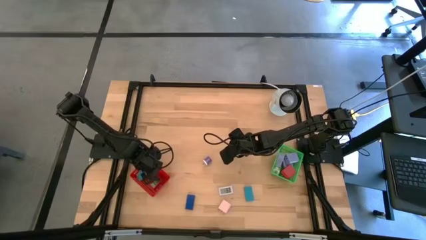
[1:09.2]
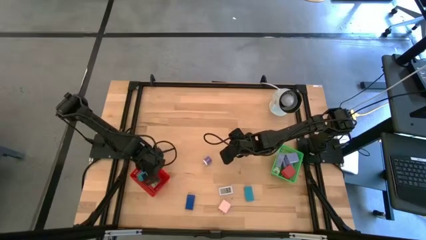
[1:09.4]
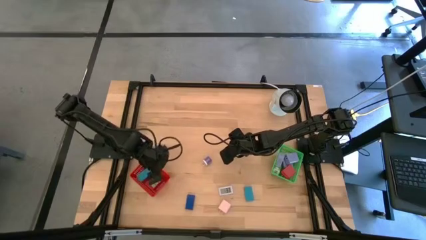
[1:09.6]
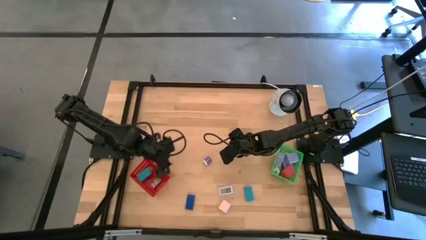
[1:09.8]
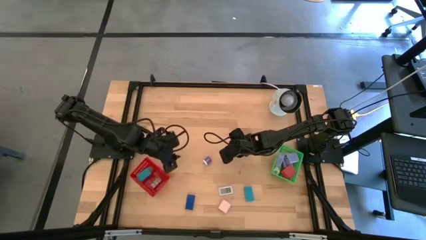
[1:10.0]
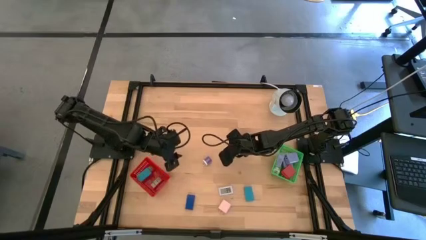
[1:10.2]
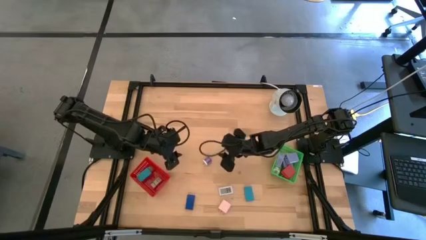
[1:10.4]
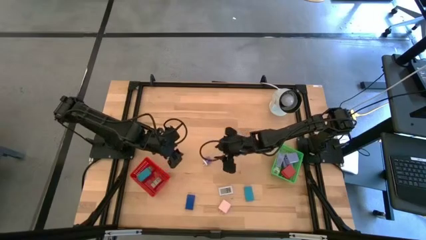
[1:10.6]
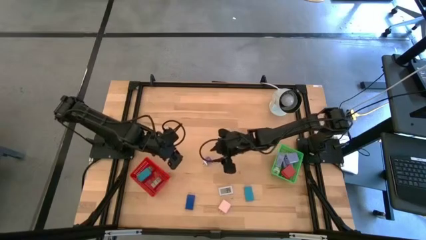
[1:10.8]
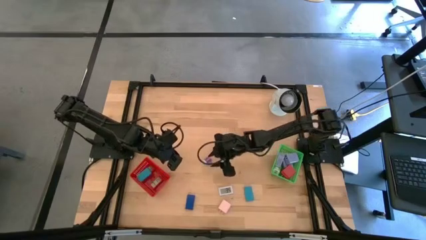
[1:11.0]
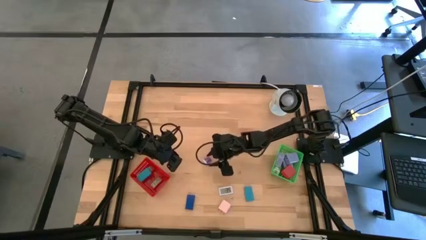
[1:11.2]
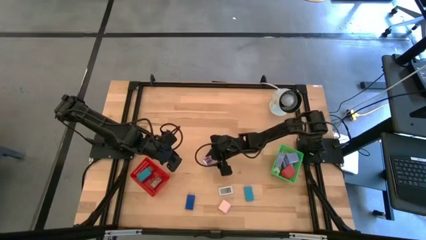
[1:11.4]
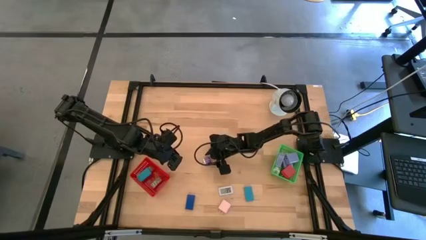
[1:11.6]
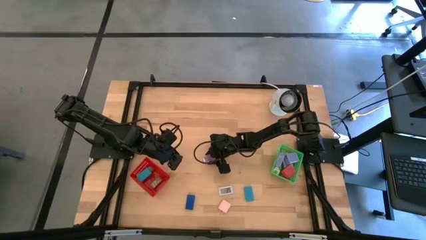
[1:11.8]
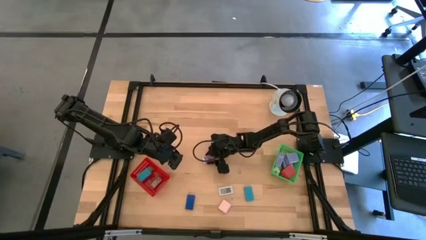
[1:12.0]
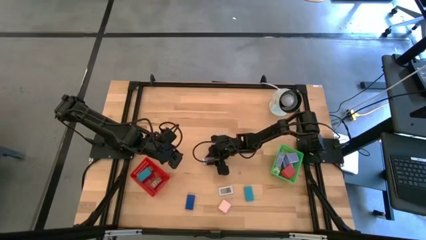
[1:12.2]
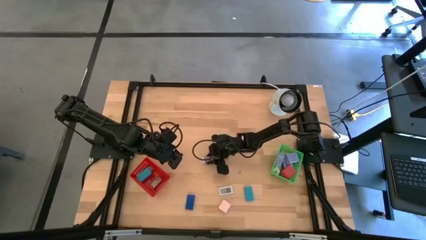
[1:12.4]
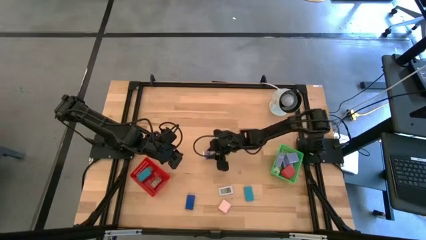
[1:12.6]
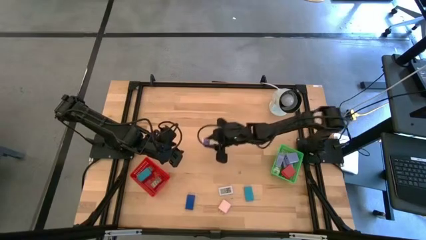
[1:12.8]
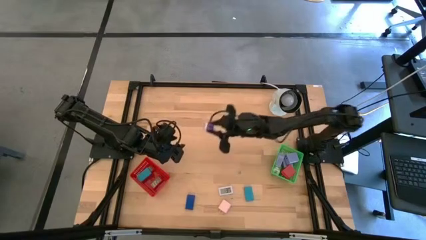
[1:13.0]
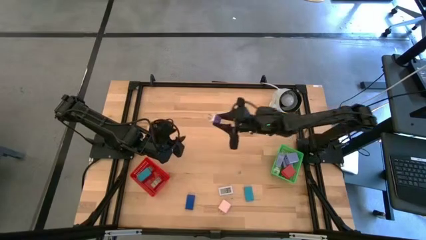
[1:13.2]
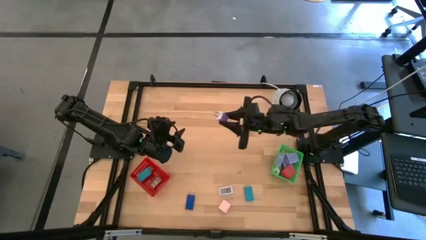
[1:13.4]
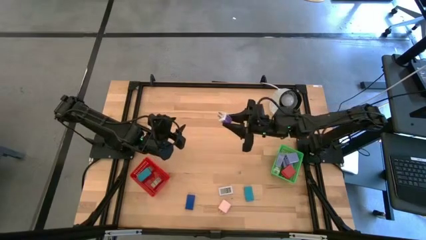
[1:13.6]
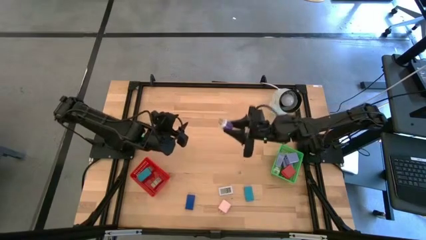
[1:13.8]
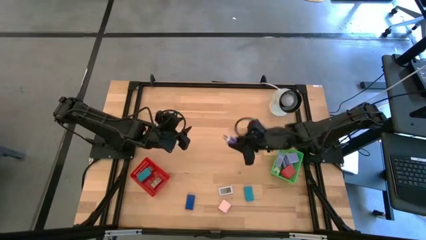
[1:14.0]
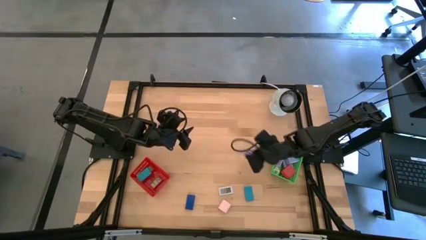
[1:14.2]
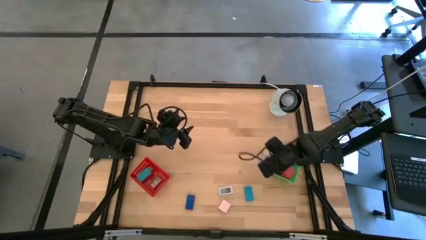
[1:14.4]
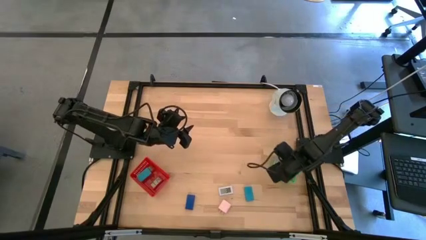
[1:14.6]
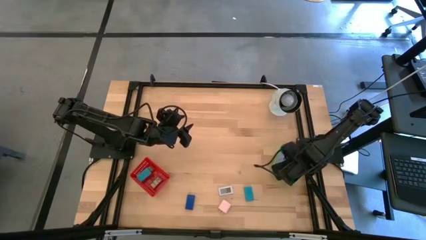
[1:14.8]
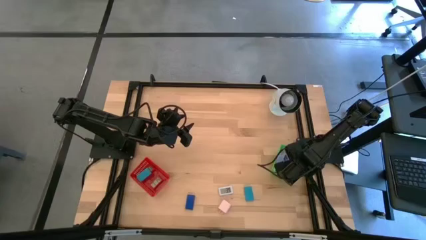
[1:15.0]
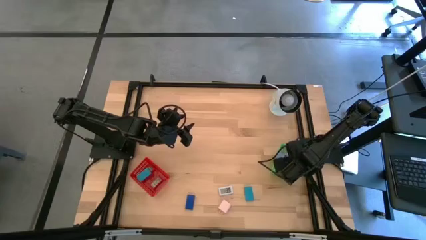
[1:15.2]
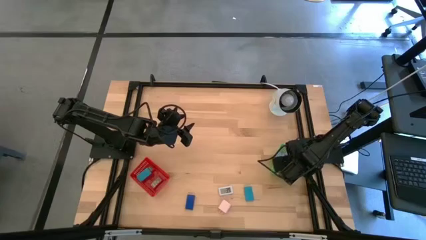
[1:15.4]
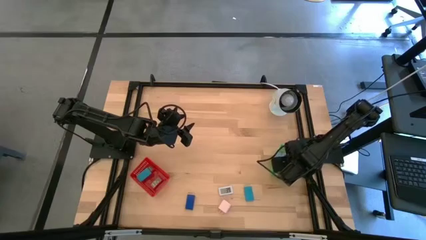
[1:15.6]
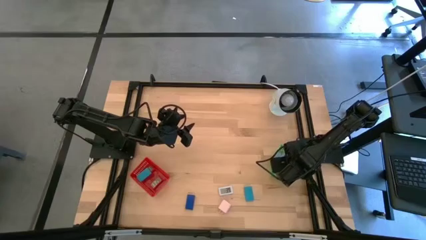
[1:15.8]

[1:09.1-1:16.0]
Task: Pick & Place Office items
Put the violet power adapter into the green bin

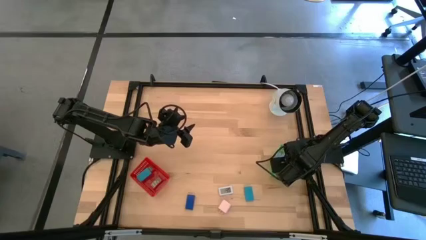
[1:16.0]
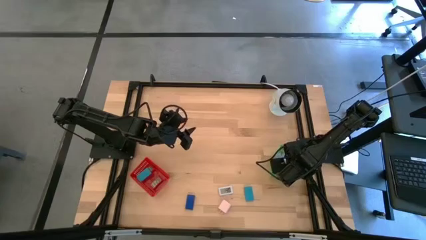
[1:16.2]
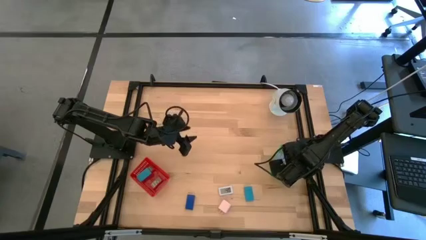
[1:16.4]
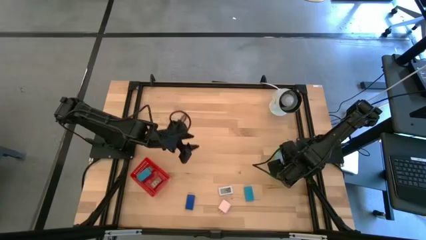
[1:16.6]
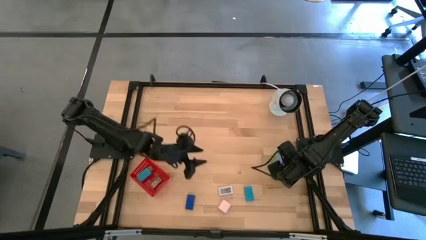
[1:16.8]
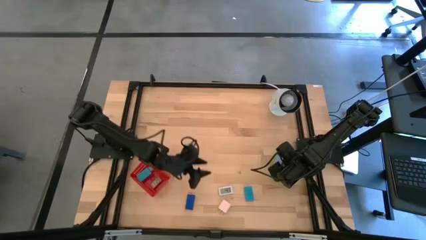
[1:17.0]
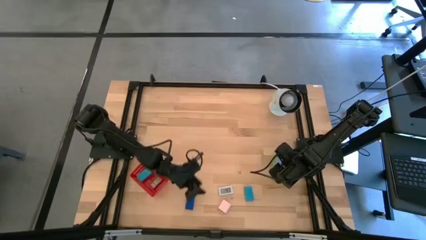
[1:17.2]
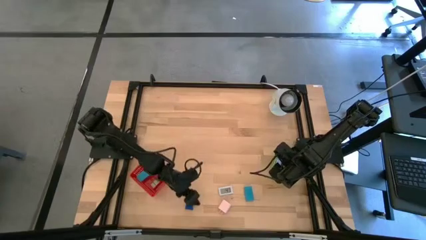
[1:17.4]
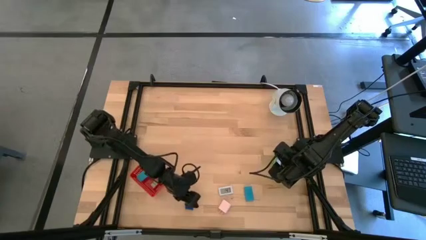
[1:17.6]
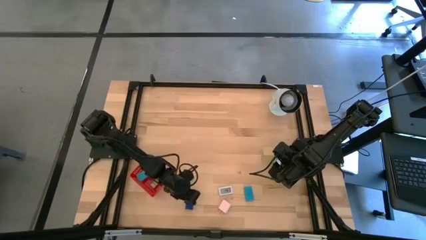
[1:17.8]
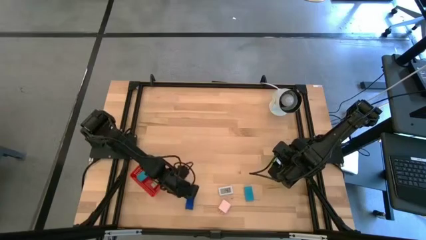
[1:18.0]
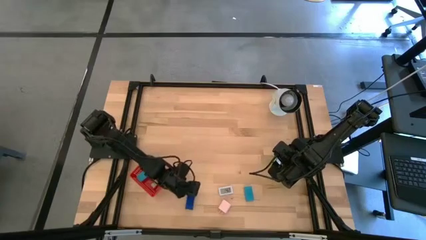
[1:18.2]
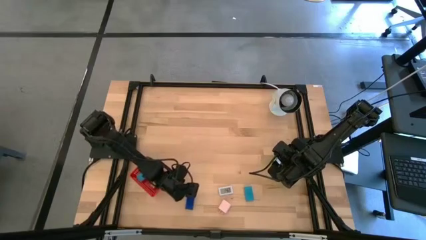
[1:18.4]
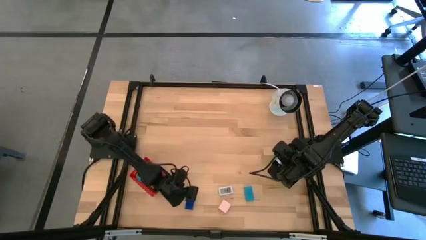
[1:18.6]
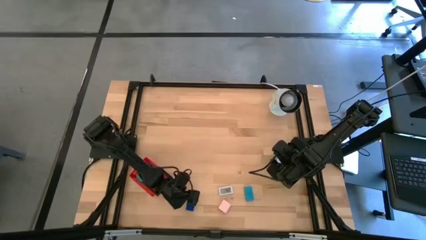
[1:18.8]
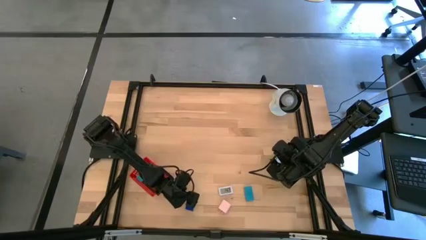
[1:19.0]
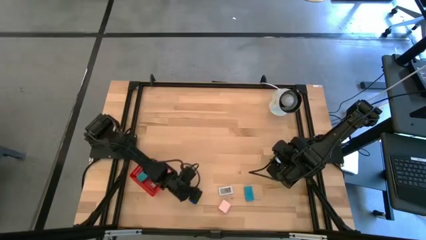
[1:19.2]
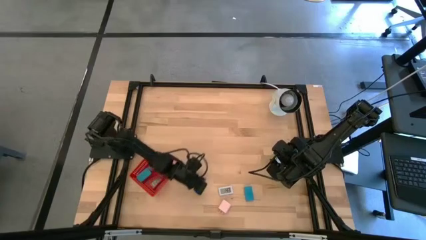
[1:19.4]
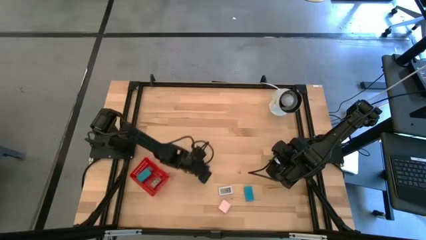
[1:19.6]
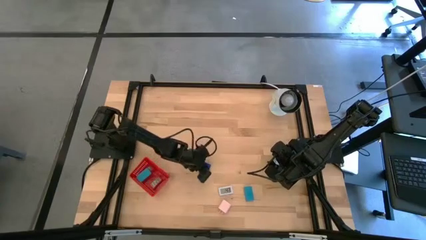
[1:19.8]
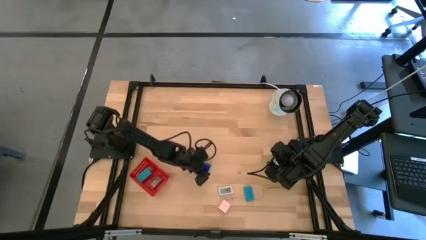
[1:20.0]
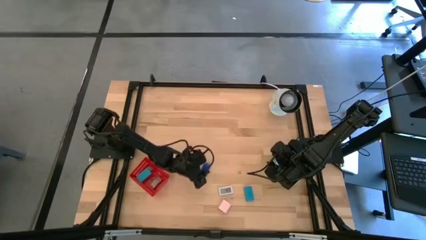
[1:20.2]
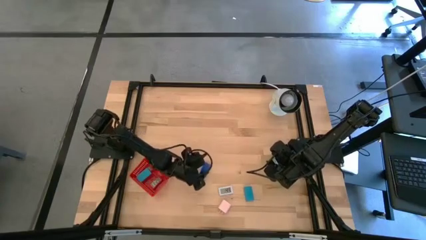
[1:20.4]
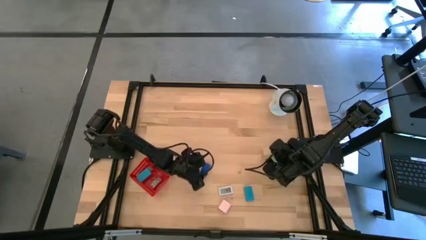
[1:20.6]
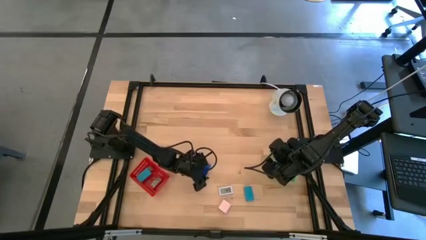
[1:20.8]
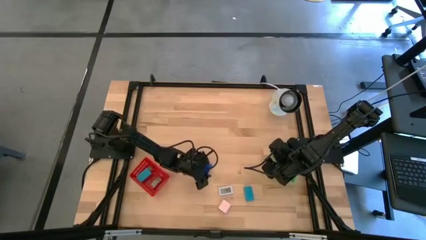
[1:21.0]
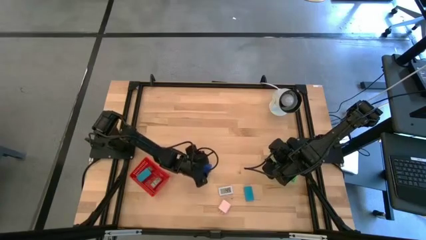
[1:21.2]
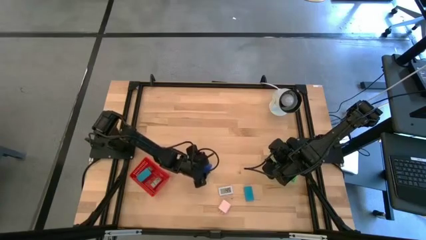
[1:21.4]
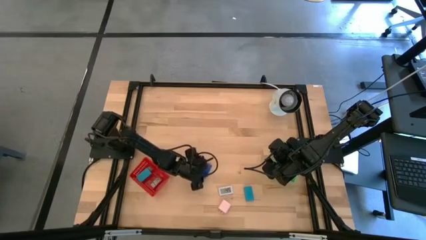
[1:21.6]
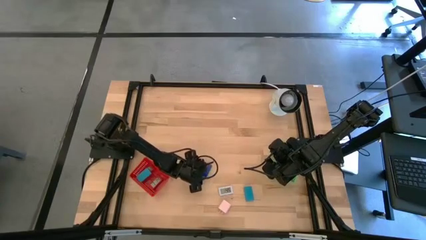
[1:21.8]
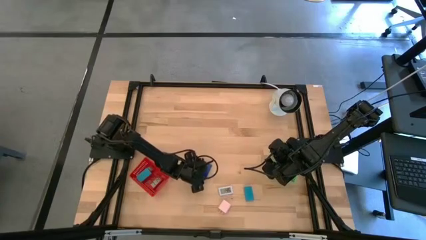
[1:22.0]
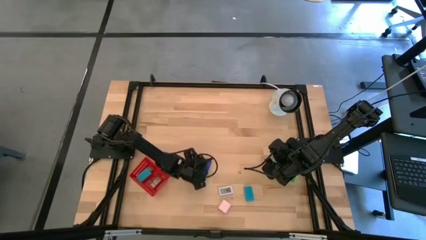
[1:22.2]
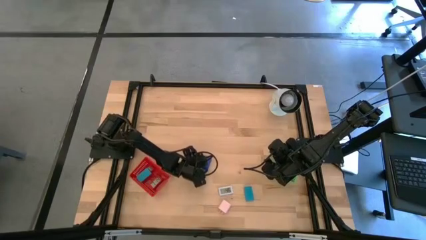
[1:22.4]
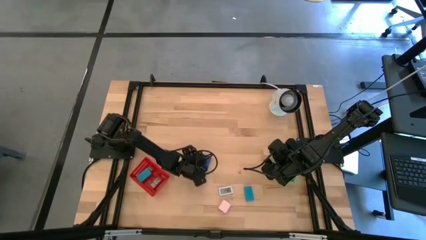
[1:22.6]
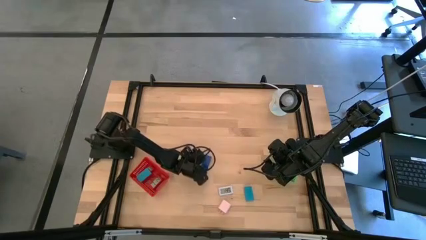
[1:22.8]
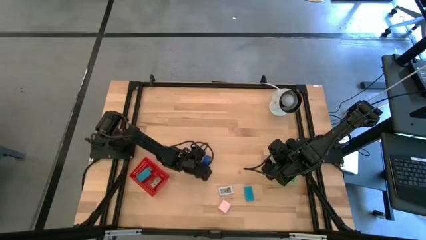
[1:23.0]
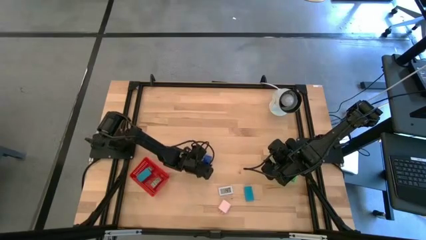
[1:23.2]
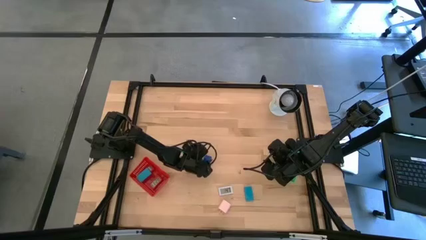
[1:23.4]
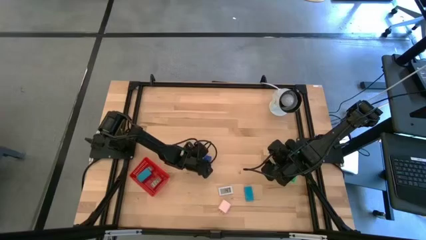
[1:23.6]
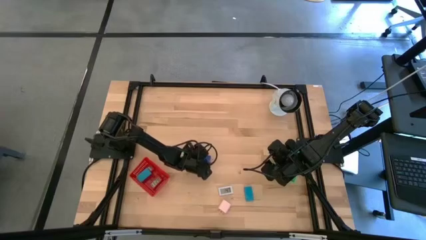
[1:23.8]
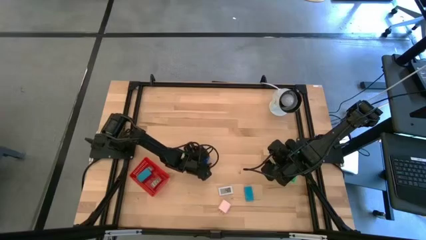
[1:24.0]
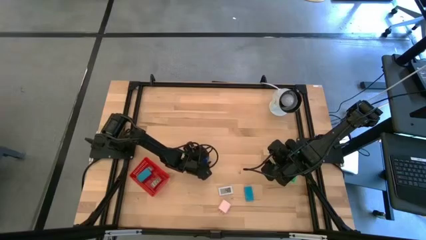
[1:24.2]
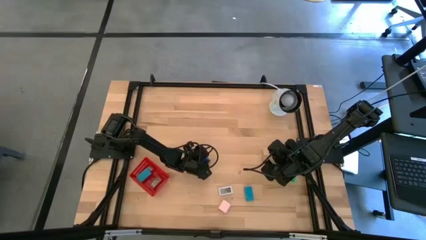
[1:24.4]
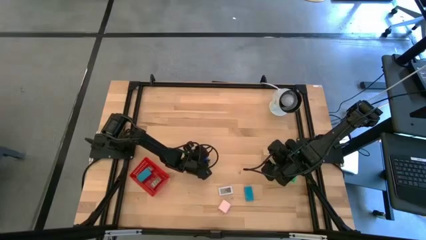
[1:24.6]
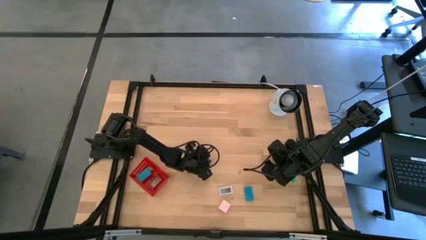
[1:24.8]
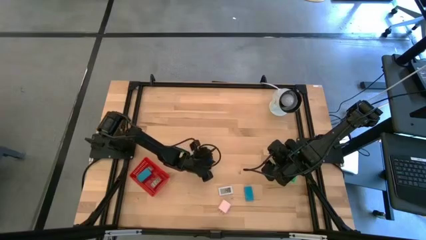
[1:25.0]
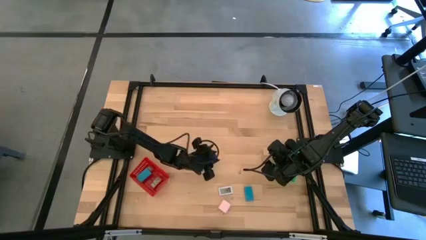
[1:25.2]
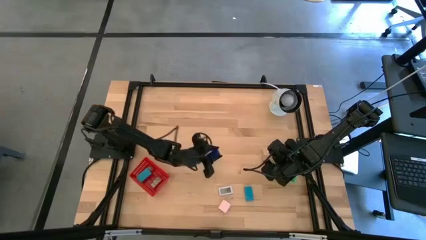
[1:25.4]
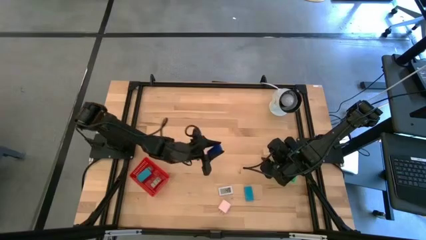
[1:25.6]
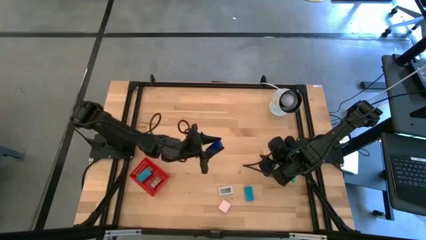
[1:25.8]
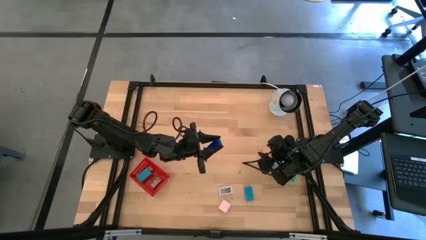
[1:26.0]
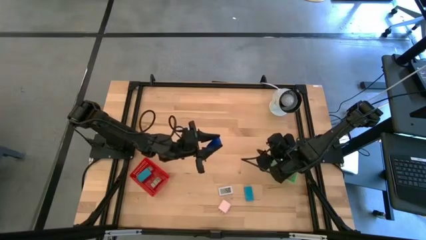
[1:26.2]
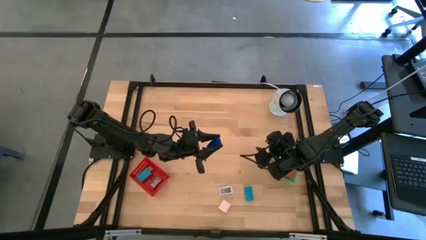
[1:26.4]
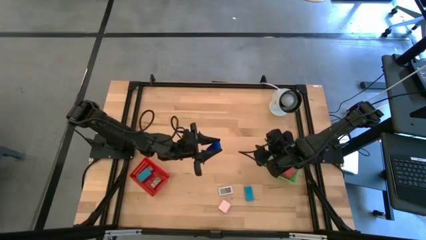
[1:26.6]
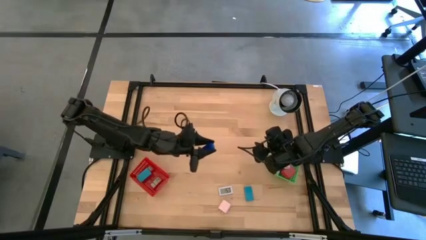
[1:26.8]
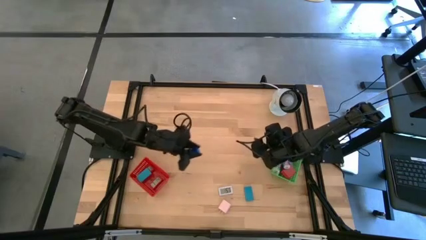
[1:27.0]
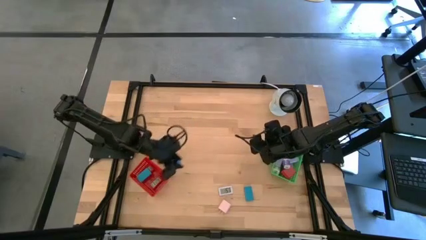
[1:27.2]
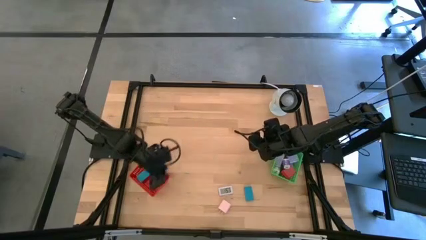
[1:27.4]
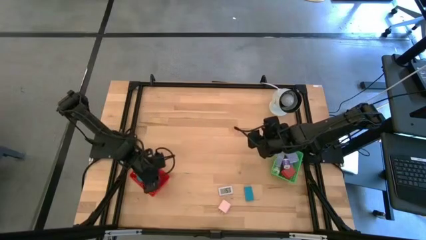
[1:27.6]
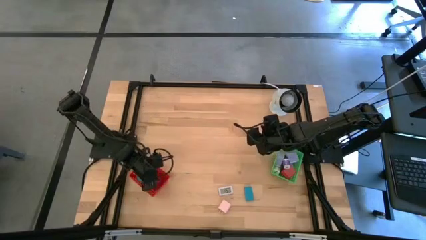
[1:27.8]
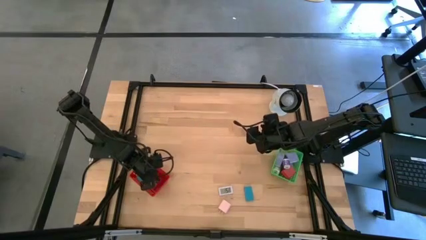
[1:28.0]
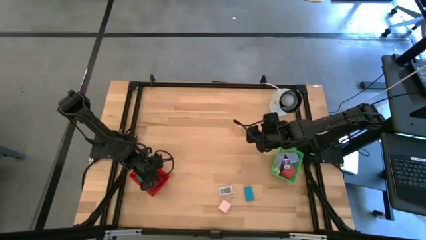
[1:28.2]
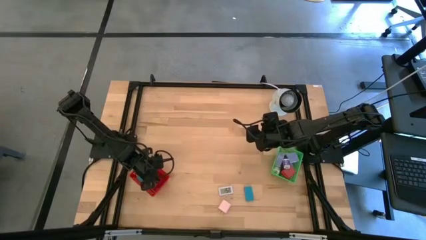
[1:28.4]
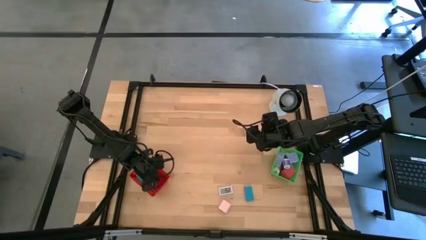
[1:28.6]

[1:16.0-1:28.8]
Put the blue digital clock into the red bin
